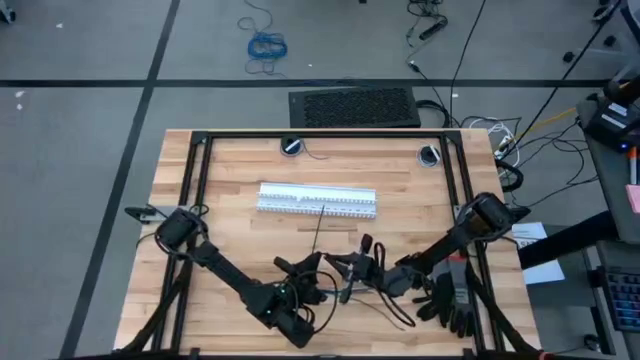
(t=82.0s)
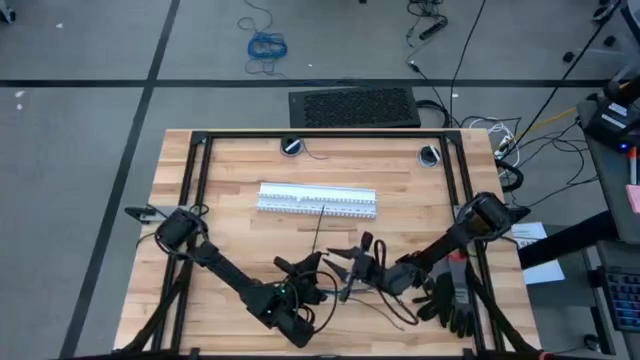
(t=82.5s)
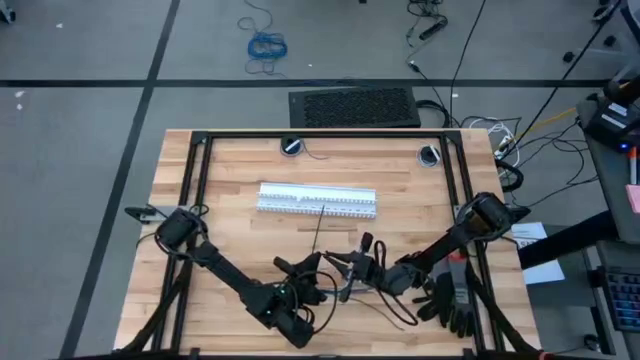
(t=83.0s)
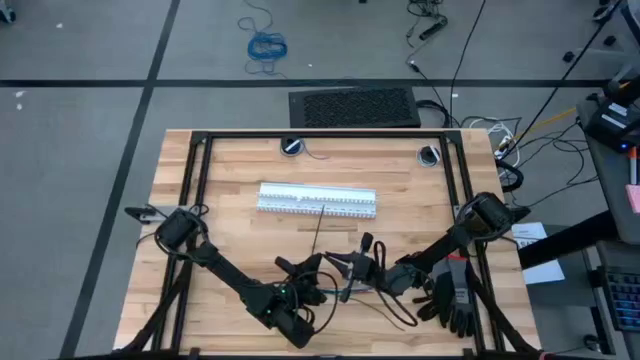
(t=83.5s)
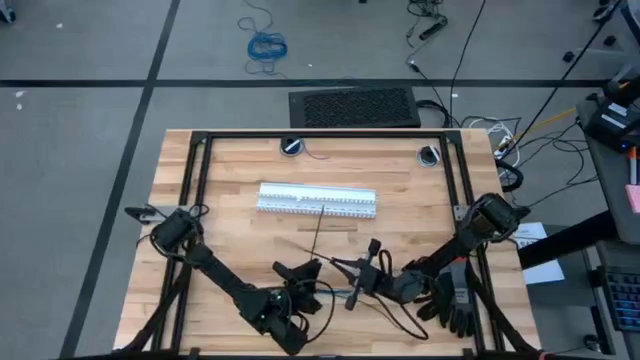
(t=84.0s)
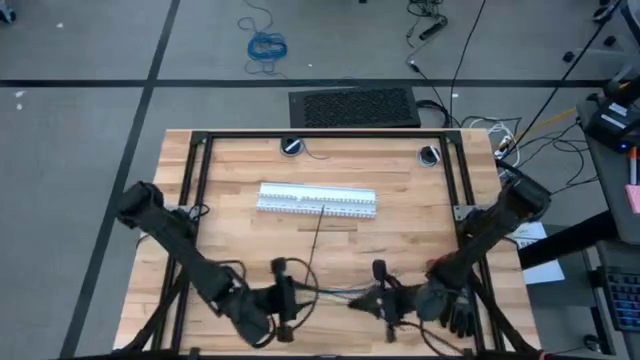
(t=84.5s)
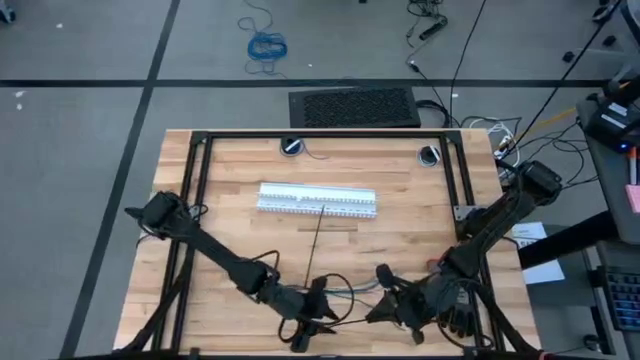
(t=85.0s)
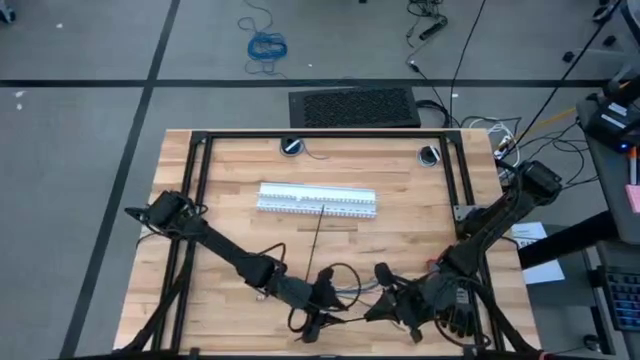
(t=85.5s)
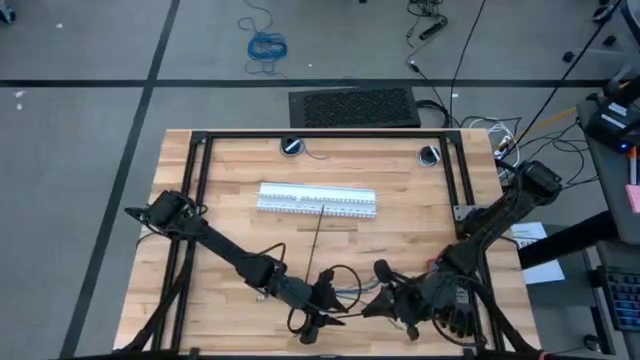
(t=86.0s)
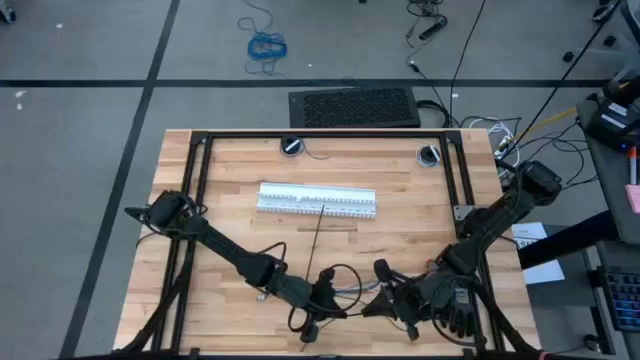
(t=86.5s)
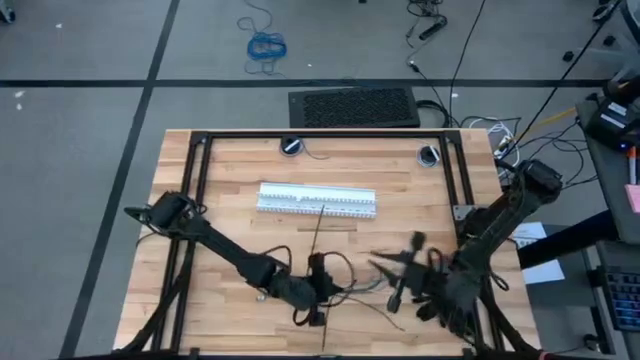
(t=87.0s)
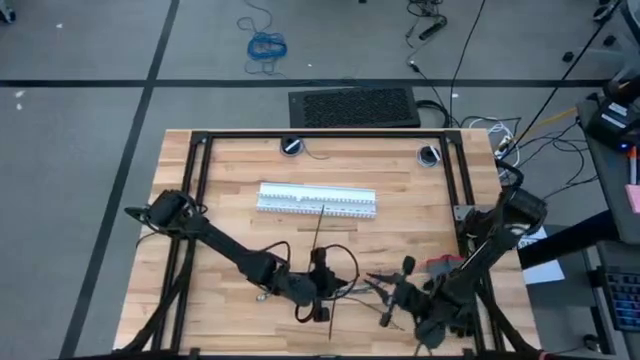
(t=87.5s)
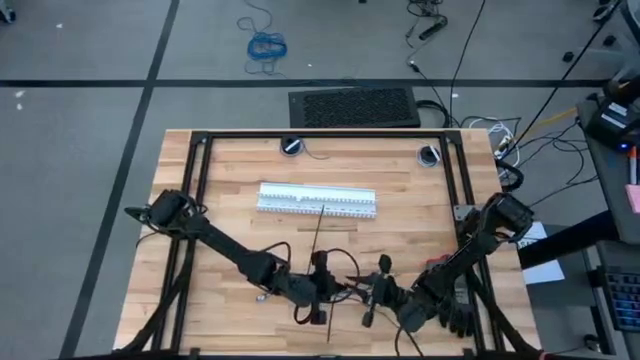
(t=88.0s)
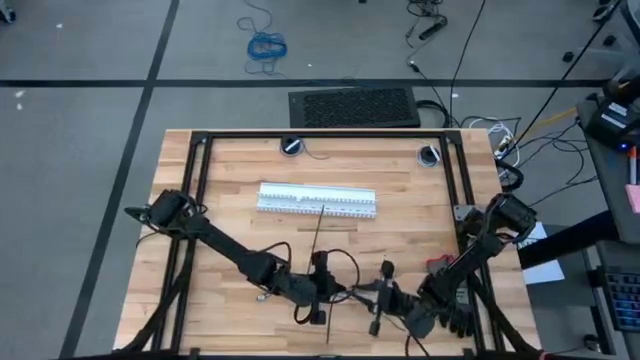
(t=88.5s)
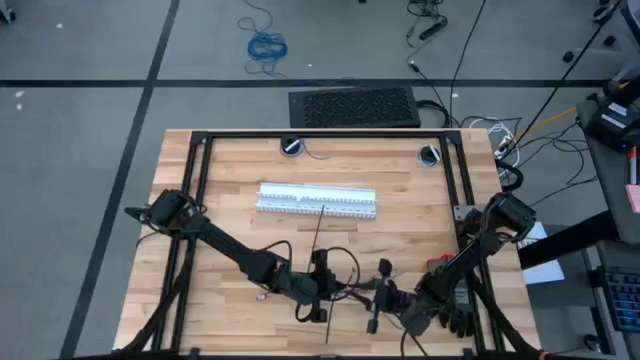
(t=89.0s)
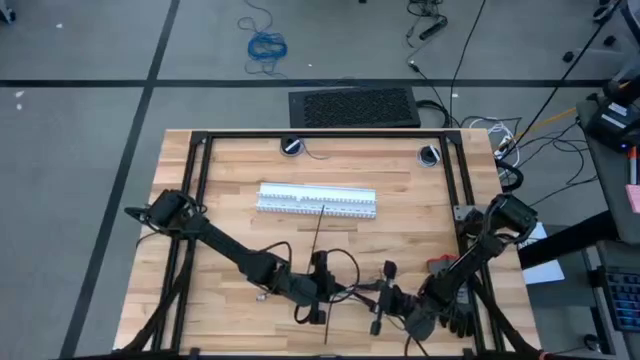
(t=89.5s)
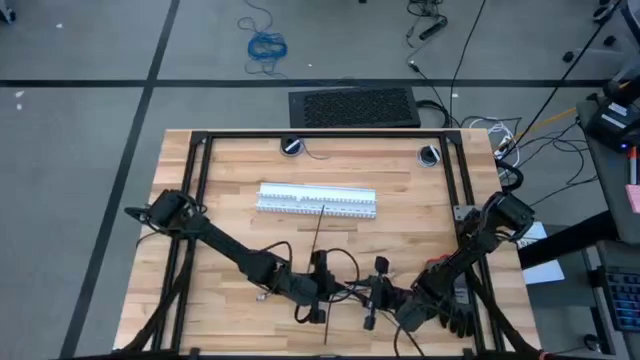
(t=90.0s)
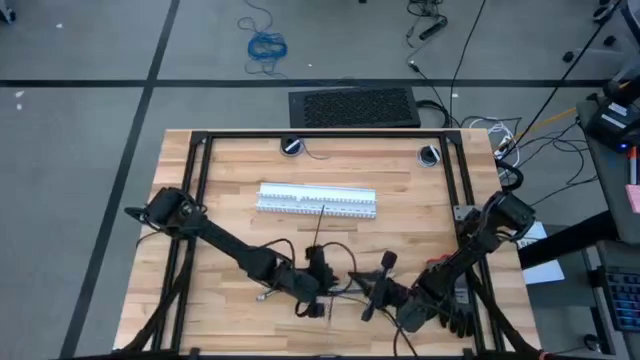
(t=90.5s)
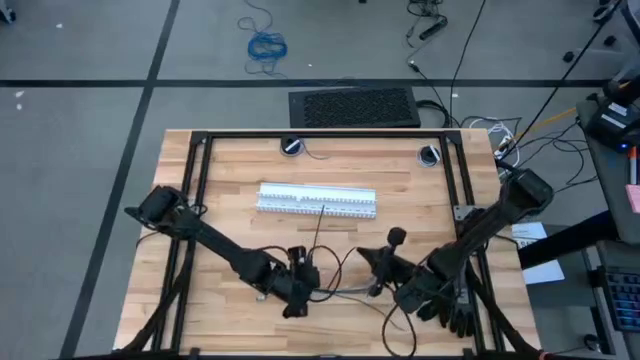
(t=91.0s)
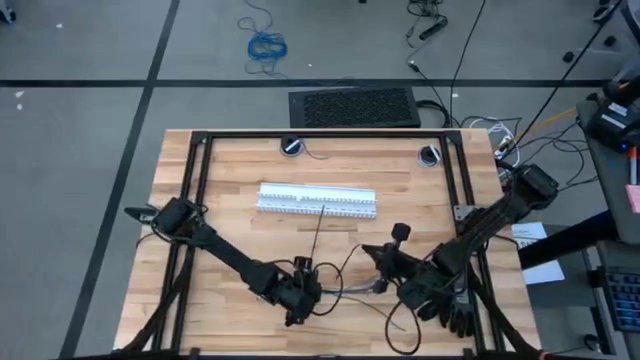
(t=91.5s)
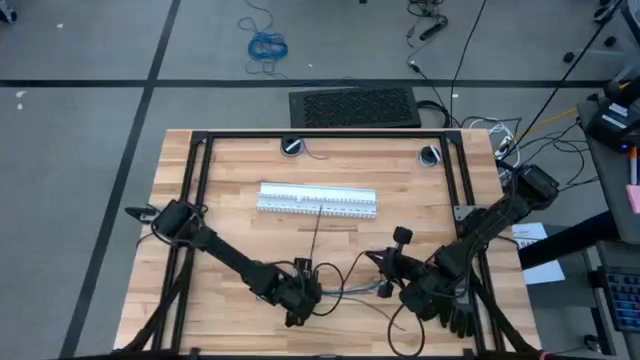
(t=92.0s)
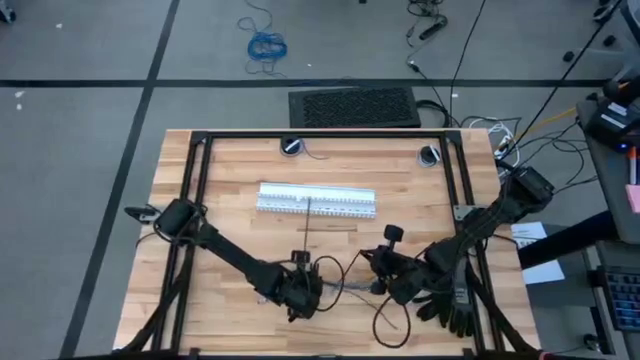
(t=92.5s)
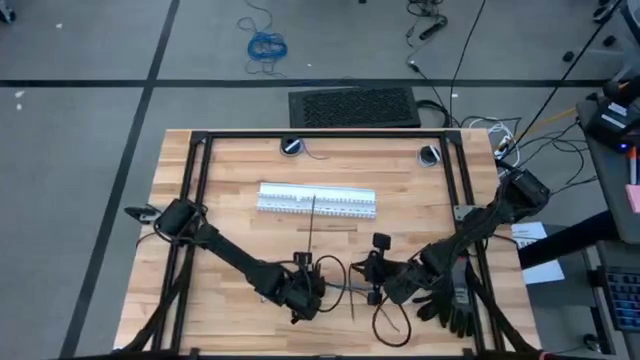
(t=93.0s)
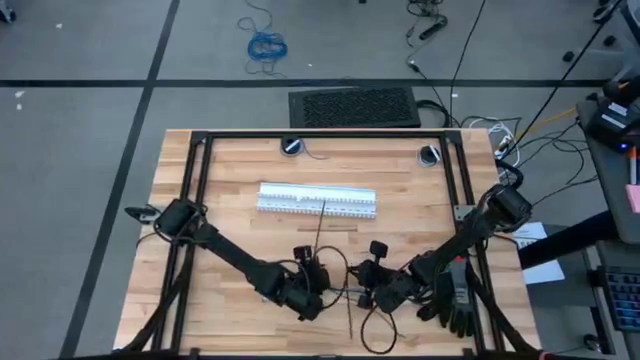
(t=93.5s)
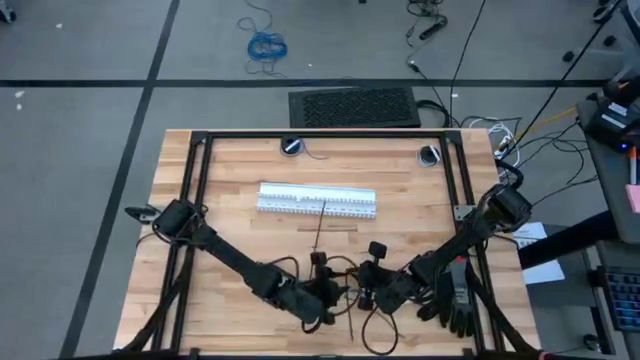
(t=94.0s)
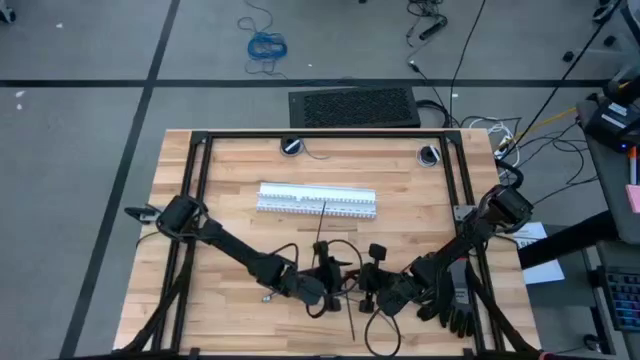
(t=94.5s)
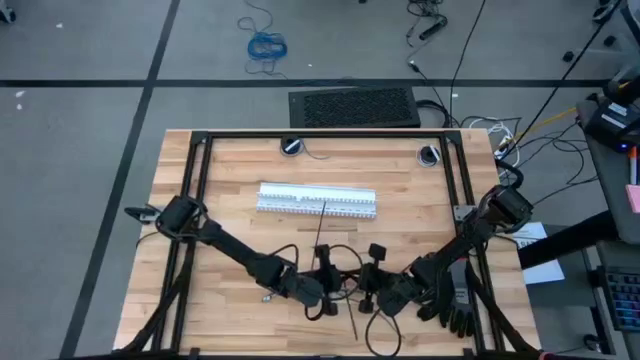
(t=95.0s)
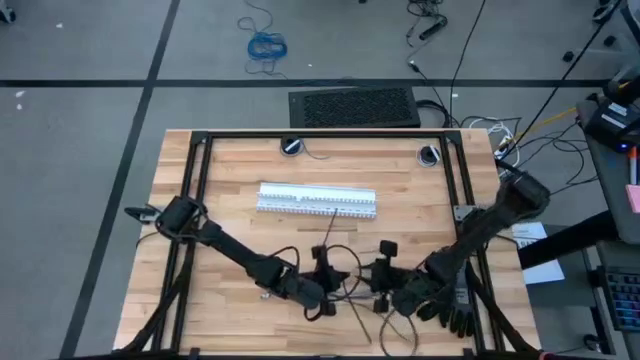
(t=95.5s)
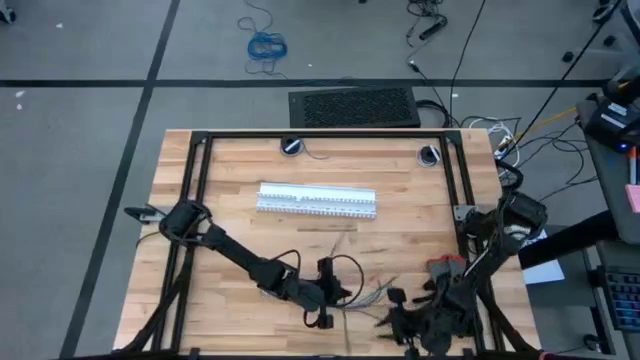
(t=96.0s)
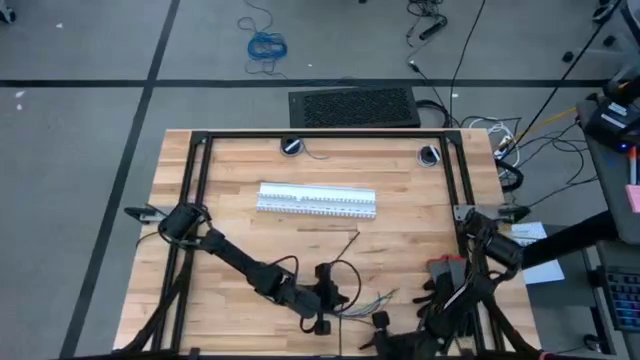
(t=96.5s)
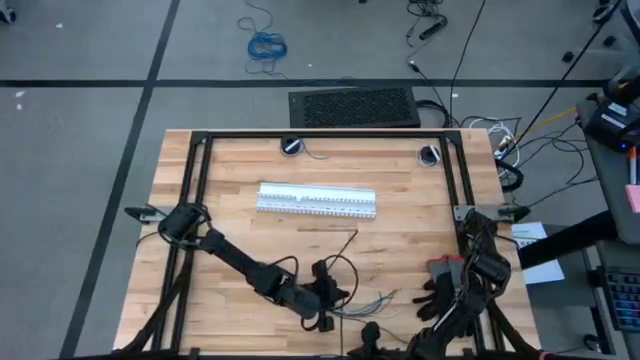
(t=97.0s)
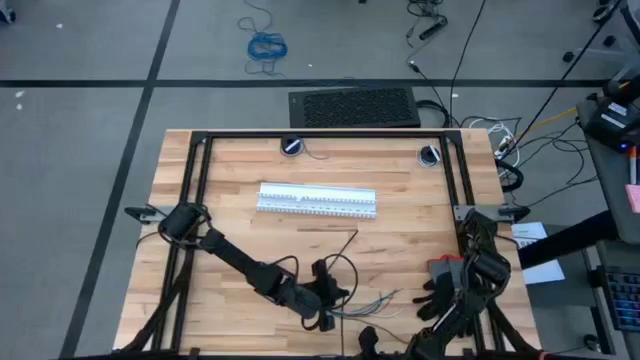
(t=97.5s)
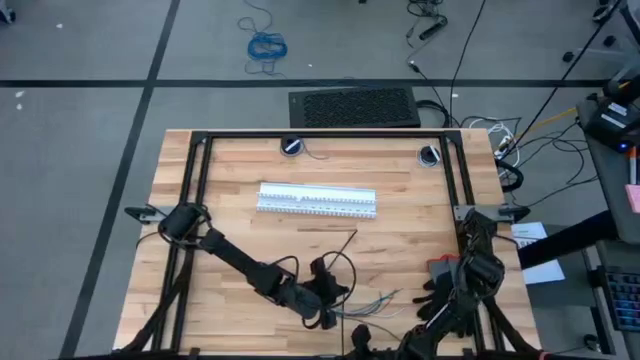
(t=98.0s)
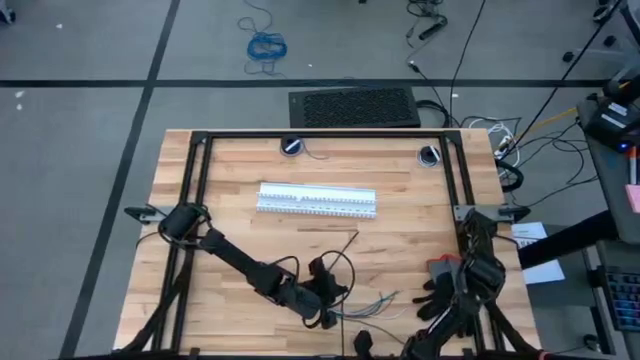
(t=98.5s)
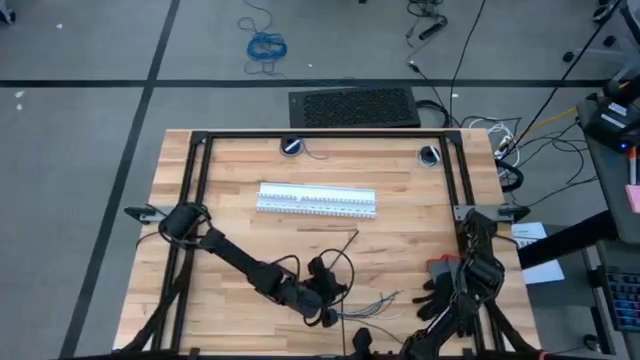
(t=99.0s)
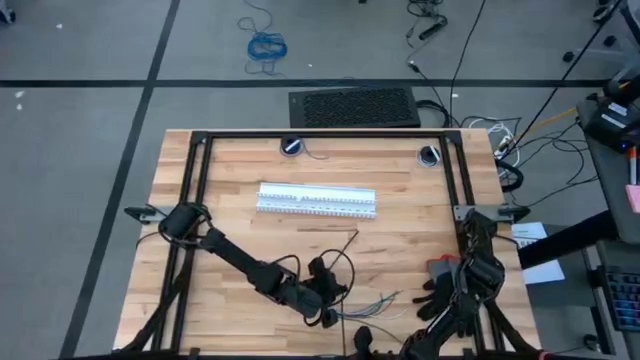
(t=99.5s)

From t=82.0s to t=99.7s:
Task: Ziptie cables
Wrap the cables together using a zip tie

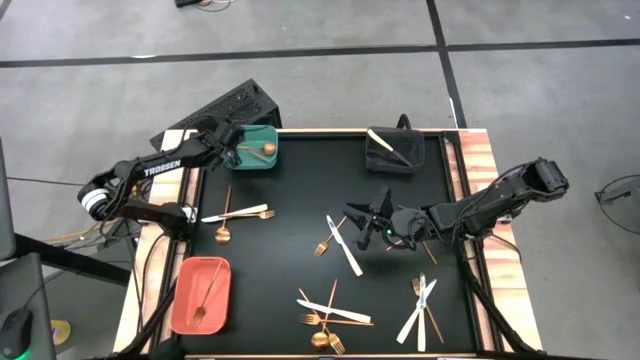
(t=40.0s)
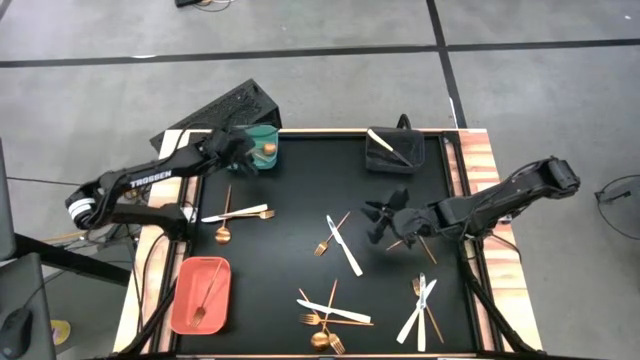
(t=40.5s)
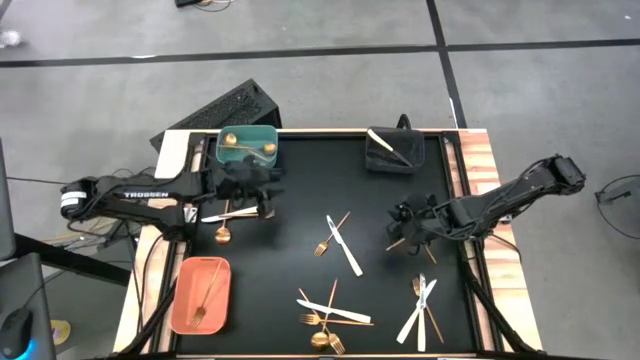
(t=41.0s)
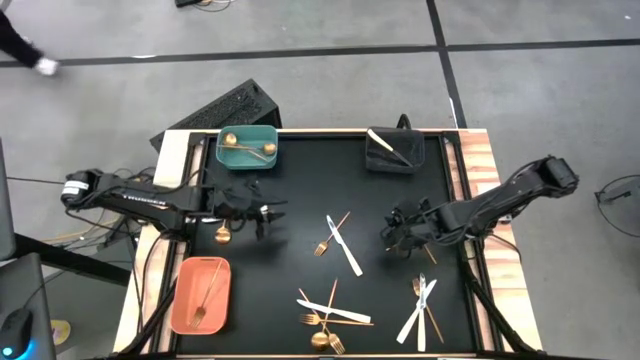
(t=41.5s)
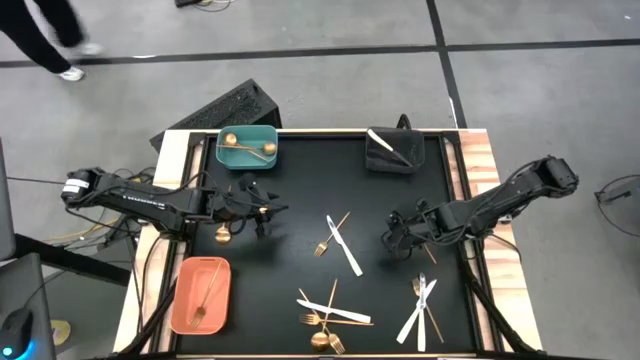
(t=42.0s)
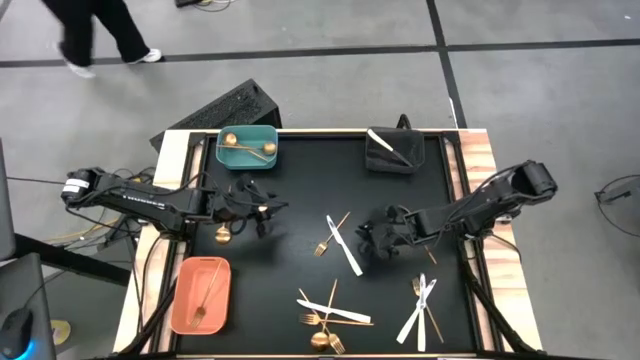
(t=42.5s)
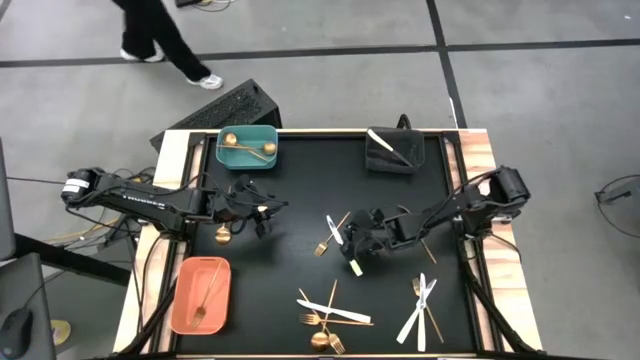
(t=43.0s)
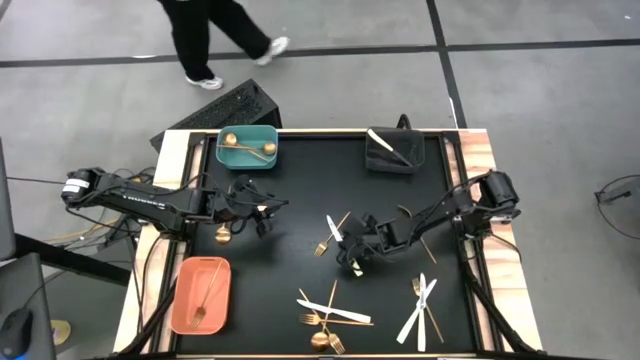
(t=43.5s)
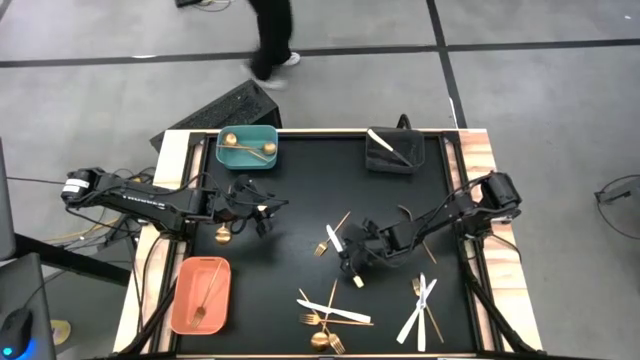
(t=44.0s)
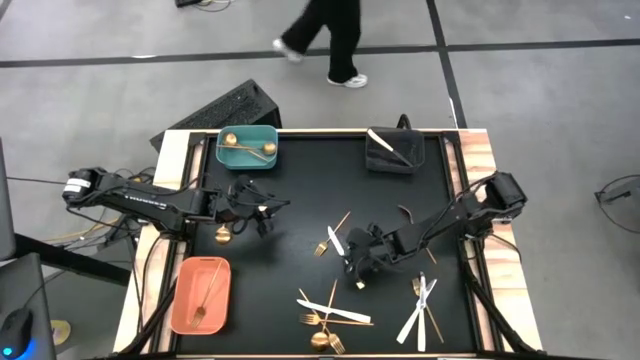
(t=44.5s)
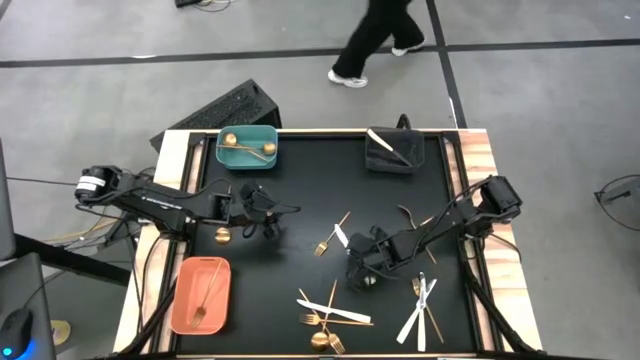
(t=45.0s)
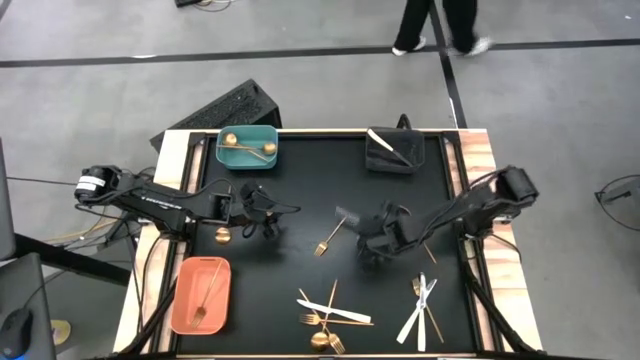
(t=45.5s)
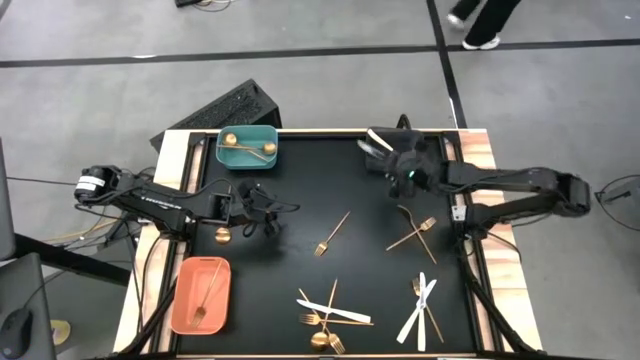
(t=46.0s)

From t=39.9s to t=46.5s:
Task: Sort silverware by color (type)
Put the white knife into the black bin
